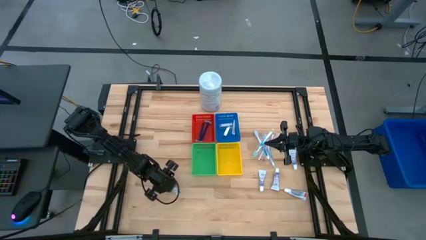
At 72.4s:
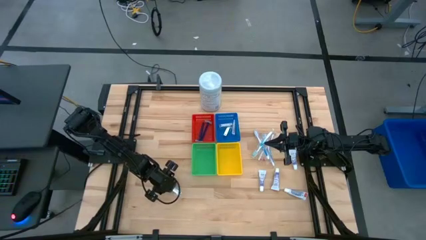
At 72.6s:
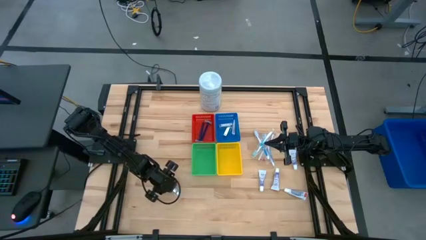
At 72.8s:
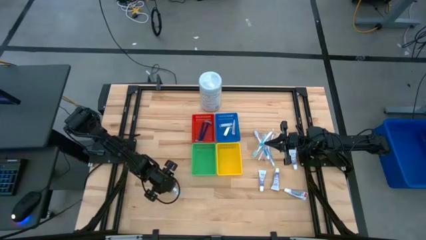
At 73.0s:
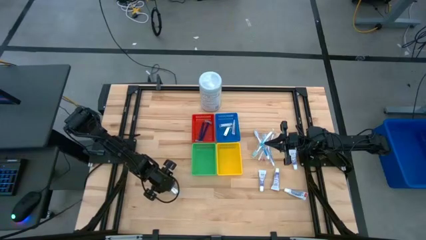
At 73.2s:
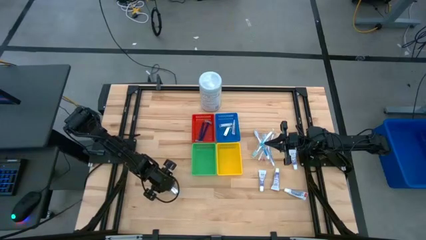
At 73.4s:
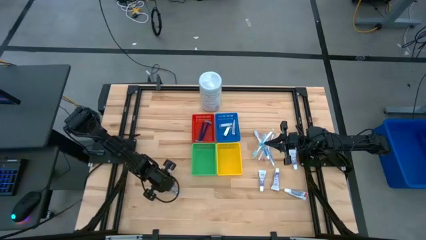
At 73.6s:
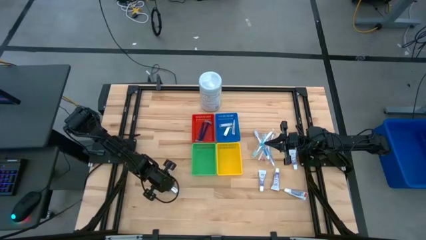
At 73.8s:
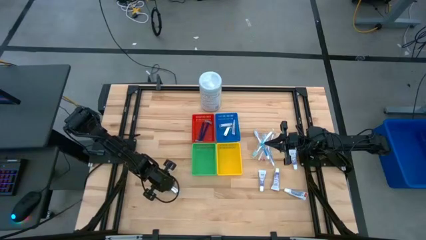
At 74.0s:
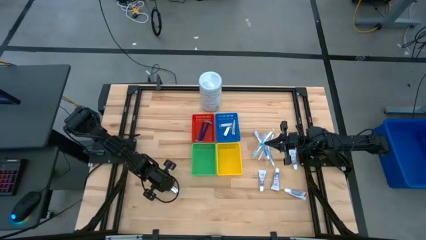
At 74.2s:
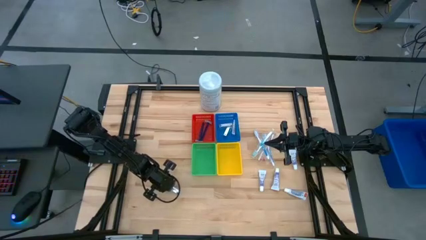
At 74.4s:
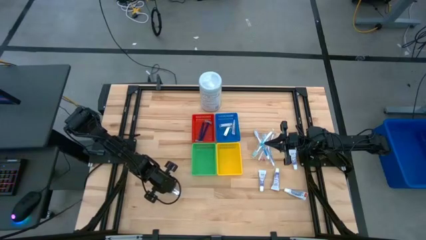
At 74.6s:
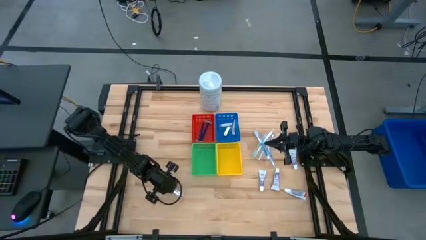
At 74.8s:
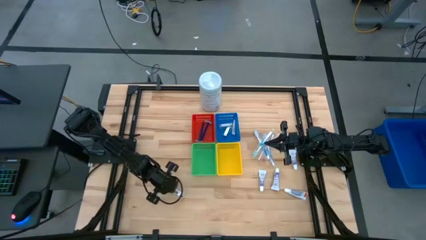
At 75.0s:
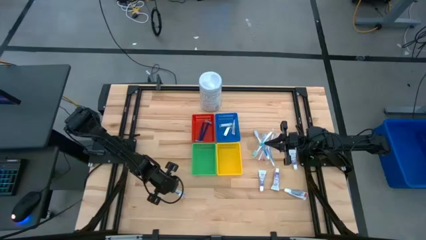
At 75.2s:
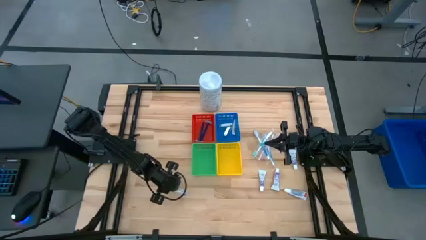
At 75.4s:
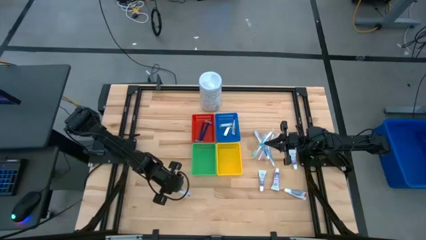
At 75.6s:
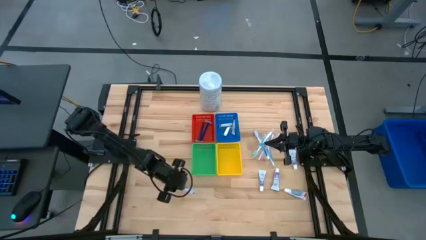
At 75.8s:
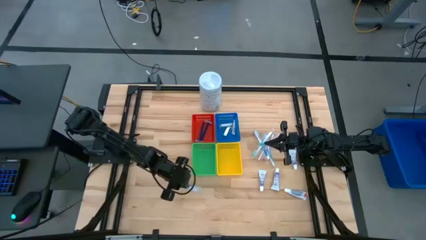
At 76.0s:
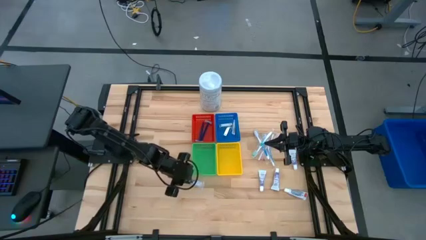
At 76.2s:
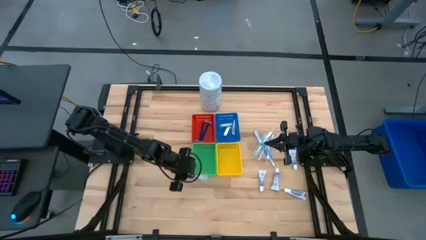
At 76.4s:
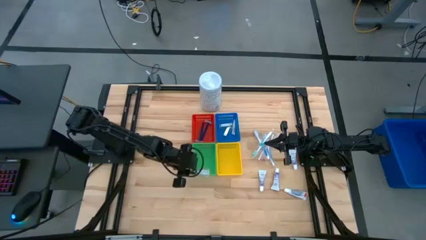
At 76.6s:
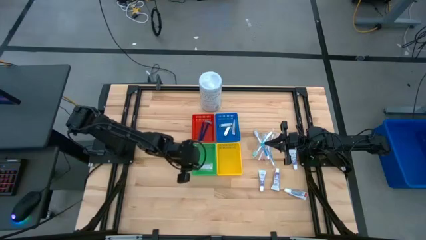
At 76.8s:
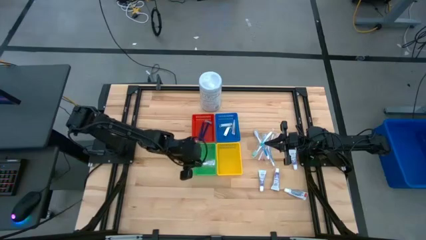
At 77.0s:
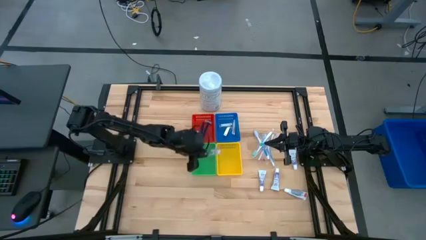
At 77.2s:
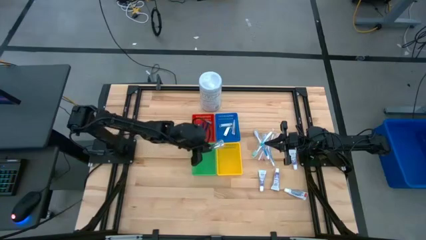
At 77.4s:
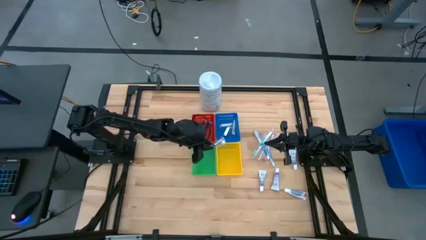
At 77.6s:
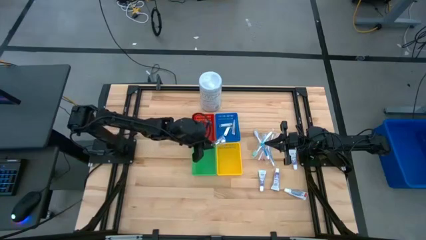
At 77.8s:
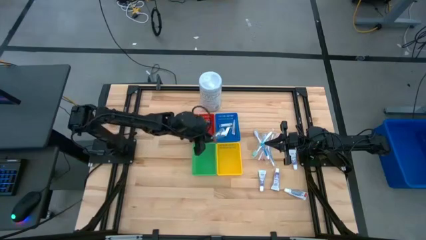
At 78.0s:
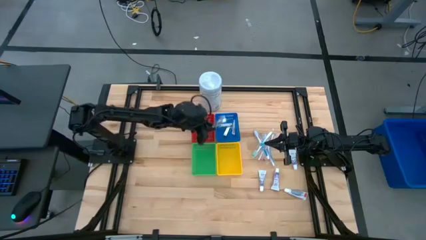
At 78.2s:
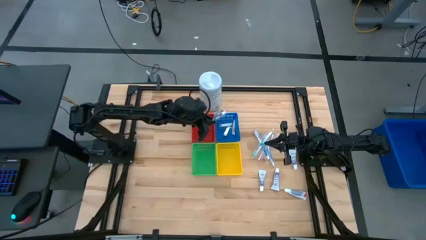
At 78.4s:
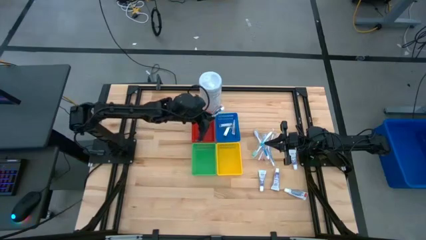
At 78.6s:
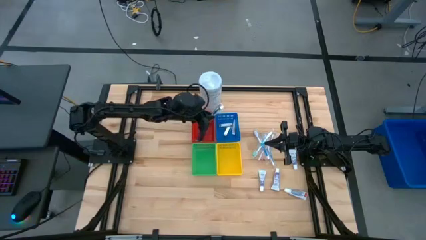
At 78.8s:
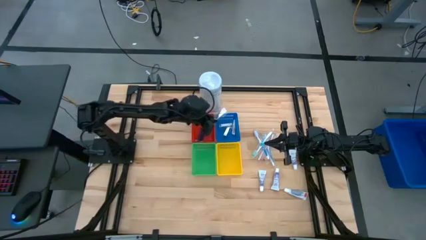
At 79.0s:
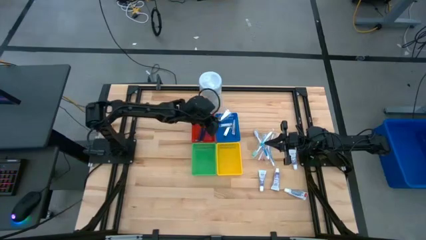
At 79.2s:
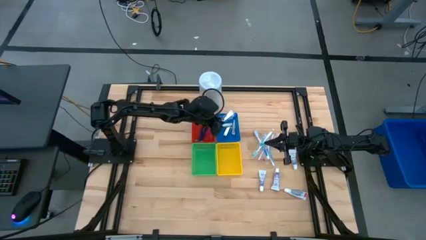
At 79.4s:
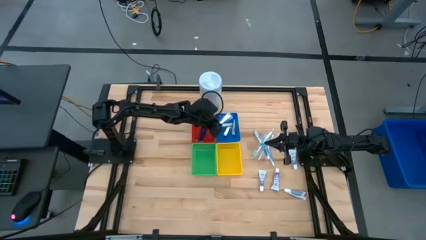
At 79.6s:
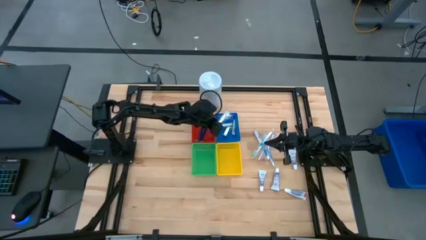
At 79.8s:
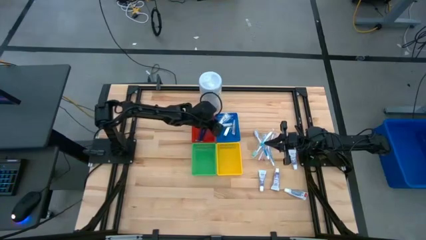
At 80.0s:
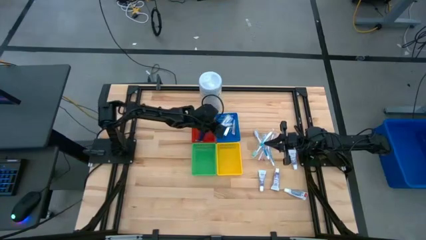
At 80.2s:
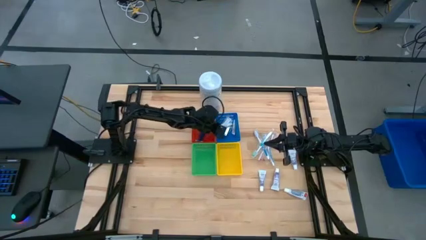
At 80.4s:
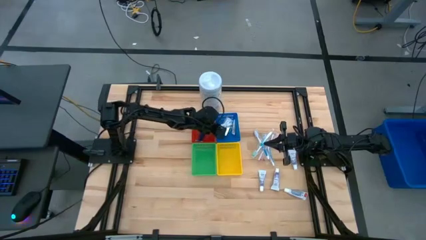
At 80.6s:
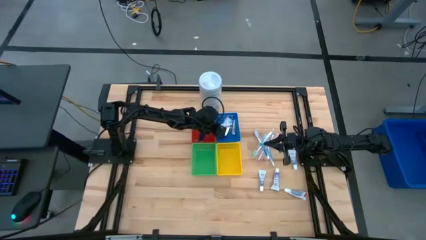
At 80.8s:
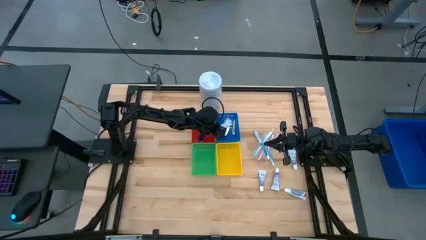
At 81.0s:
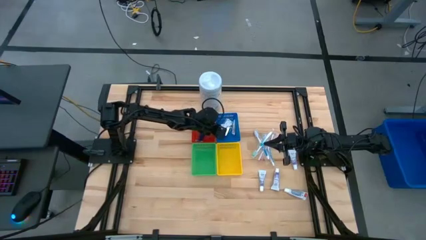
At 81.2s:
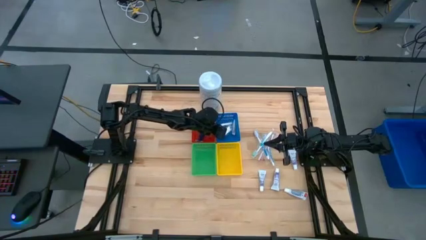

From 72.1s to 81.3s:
Task: Pick & Place Travel size toiletries
Put the silver nail cutter into the blue bin

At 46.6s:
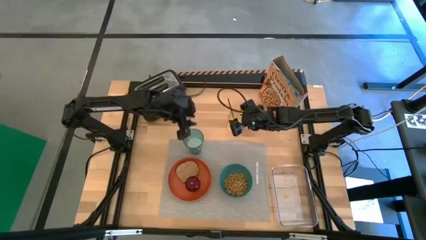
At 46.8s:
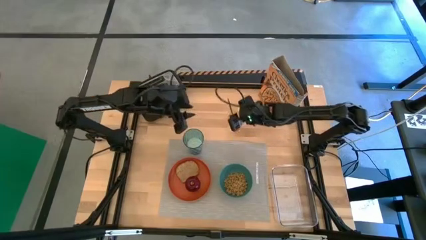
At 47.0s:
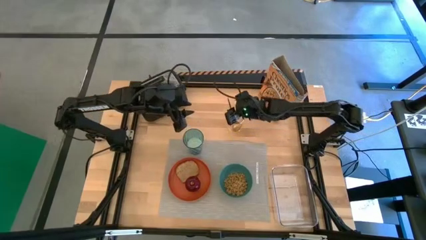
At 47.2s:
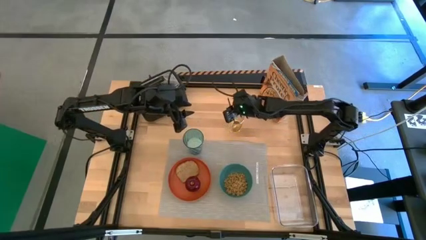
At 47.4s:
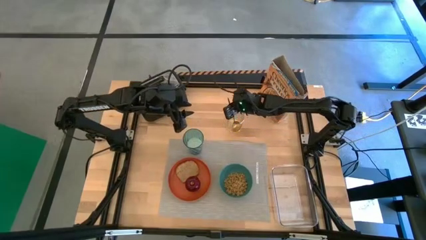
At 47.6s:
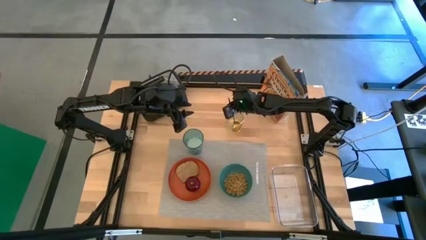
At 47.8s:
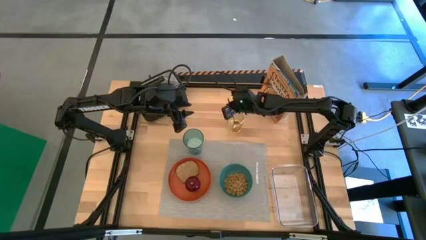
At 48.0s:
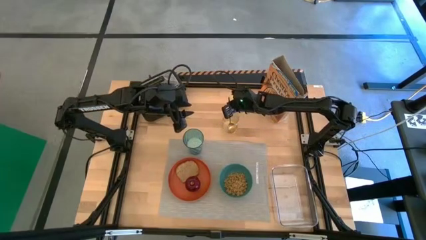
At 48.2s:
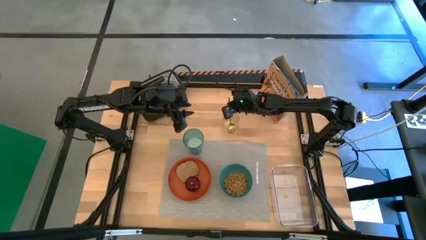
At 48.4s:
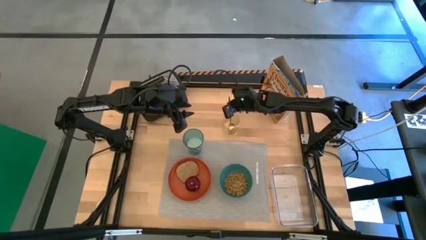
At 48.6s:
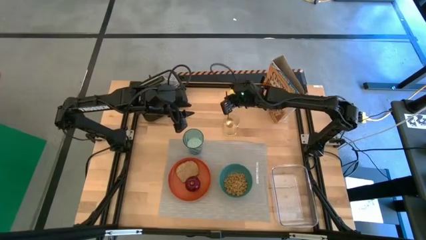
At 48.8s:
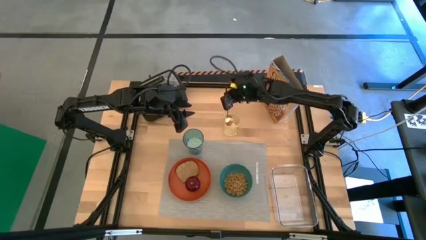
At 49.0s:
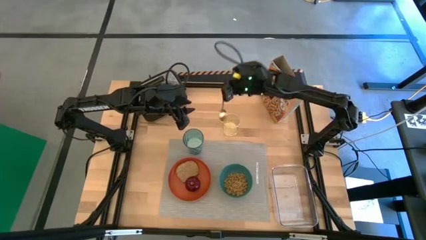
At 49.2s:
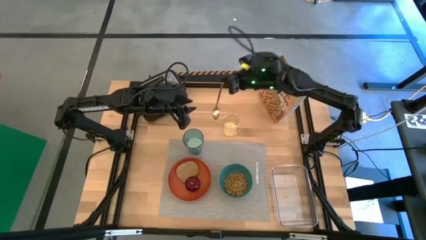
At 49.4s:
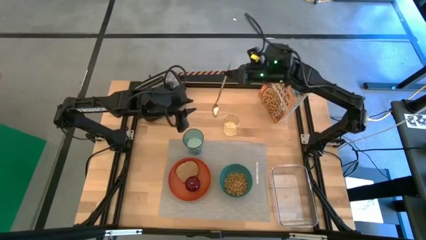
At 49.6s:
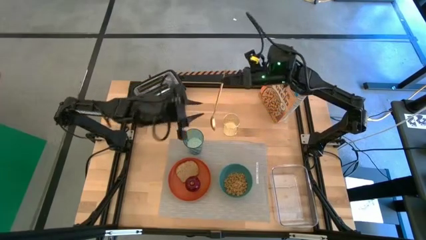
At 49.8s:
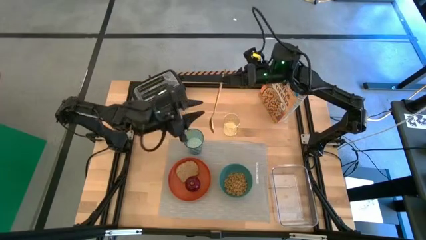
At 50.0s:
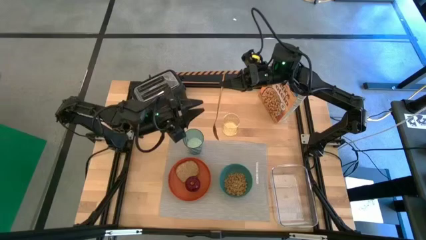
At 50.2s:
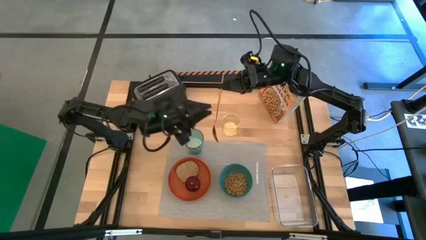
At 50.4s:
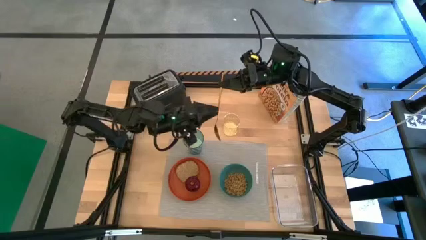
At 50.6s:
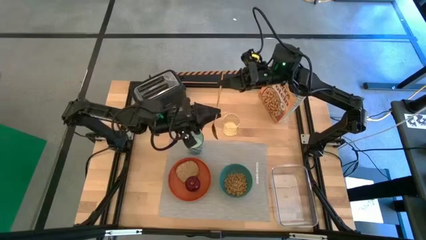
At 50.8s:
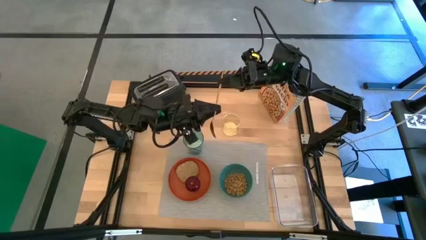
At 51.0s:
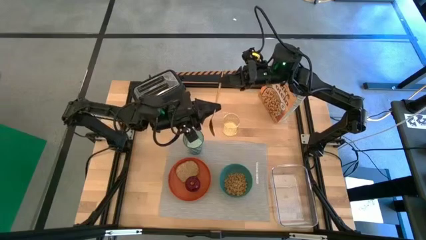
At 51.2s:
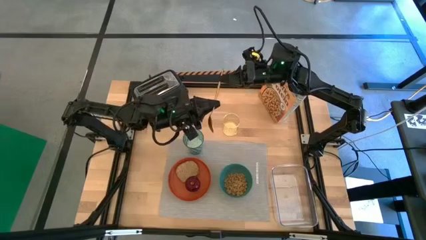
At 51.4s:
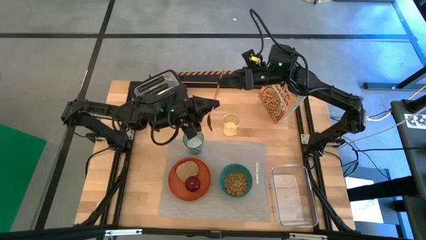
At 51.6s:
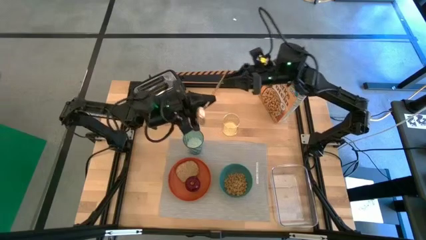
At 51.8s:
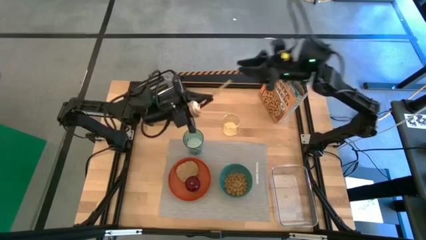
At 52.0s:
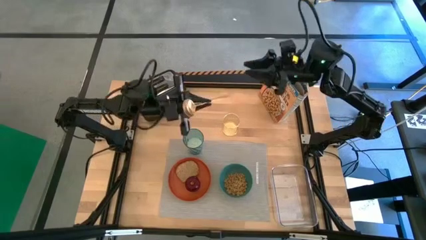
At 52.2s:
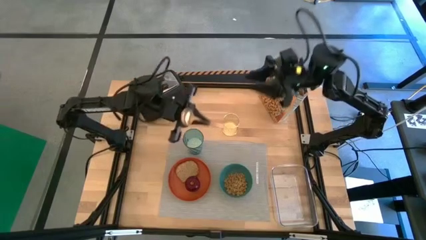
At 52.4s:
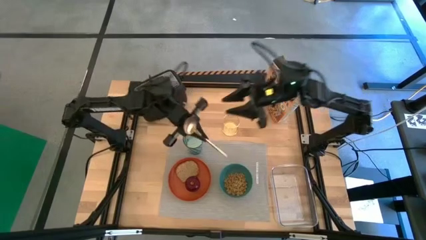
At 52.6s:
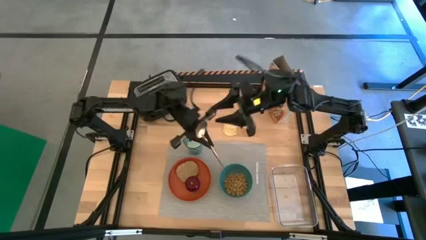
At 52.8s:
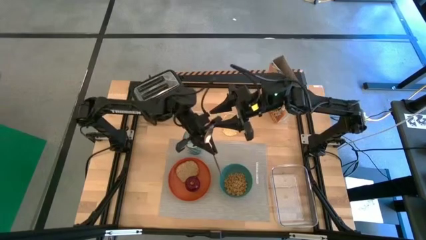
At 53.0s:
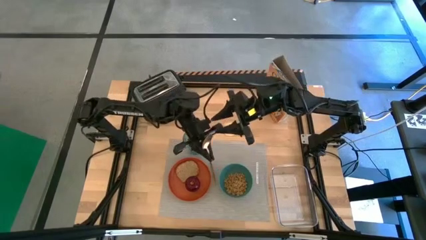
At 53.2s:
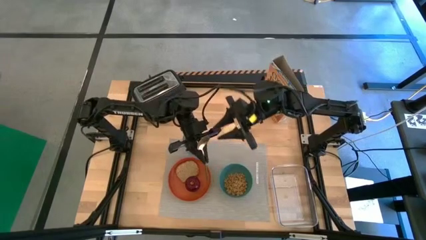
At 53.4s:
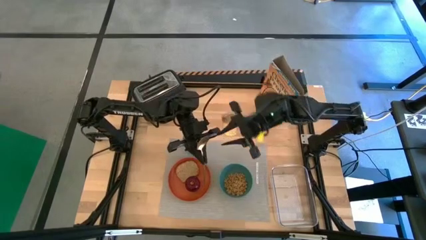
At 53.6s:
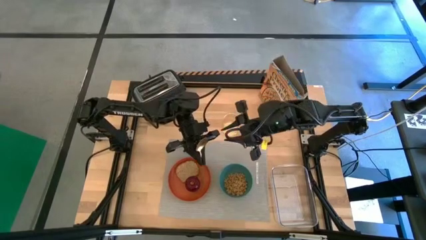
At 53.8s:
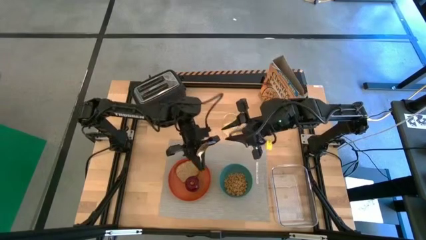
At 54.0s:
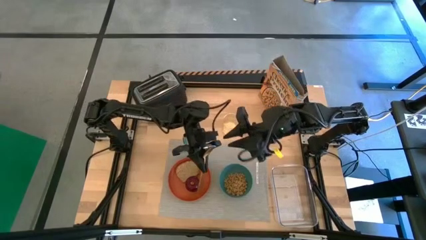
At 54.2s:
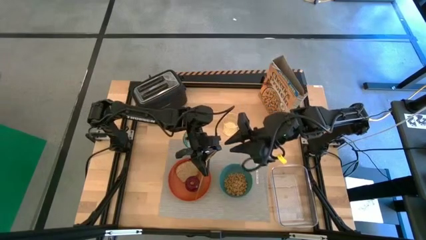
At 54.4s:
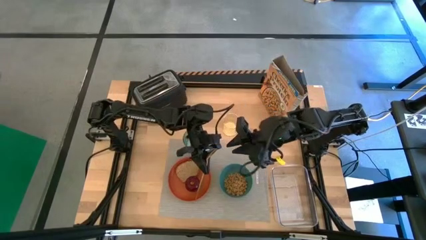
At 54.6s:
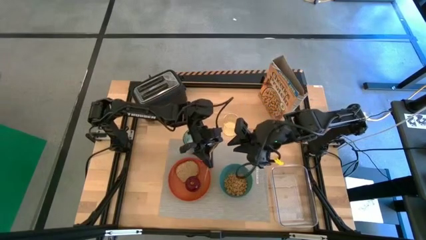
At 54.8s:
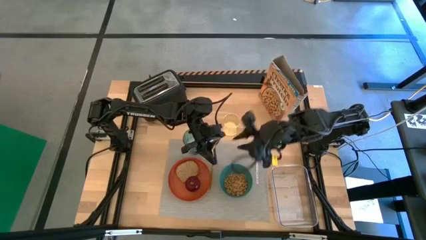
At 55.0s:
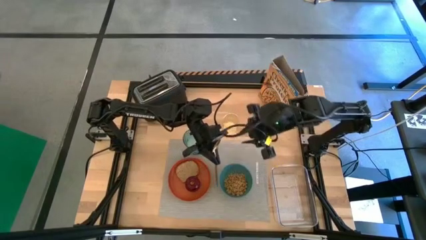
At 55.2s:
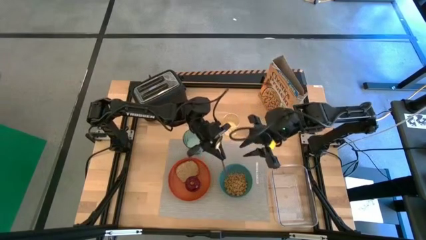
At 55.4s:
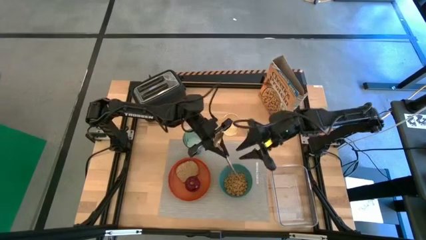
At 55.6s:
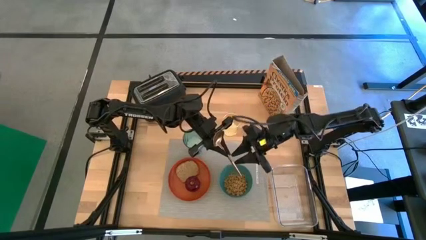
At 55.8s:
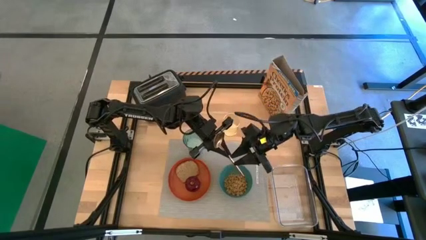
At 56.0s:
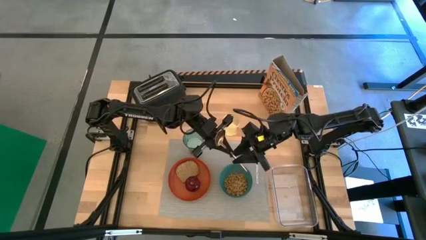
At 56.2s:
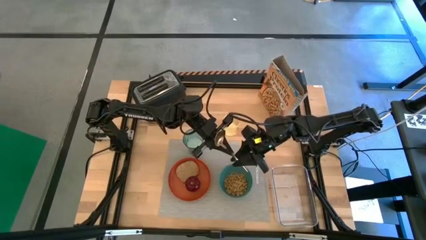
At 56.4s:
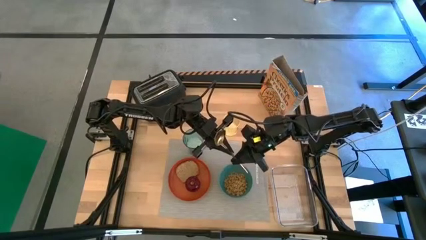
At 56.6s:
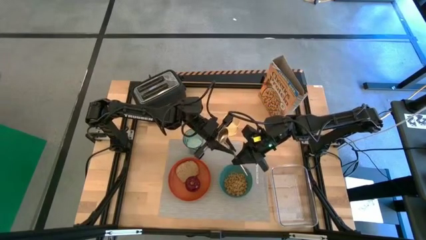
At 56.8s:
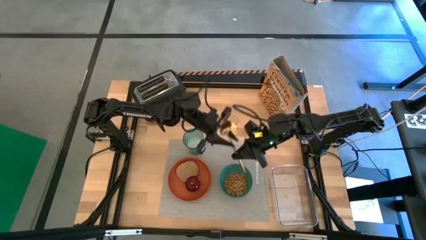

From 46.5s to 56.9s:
Task: Arrange a breakfast setting
Put the gold spoon on the gray tablemat to the right of the green bowl
